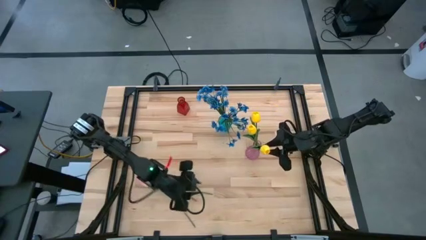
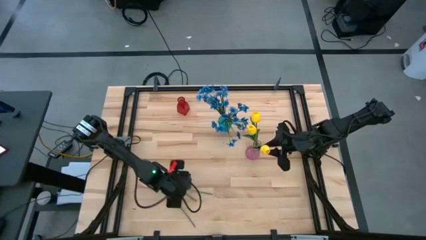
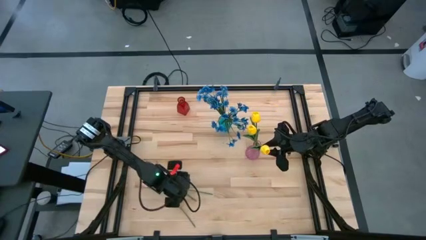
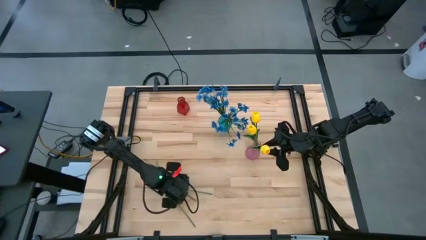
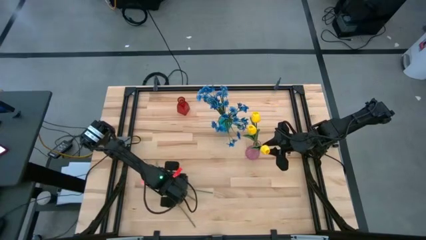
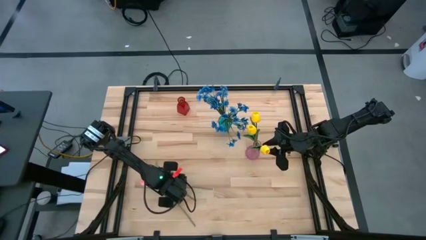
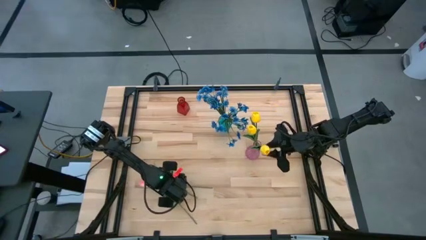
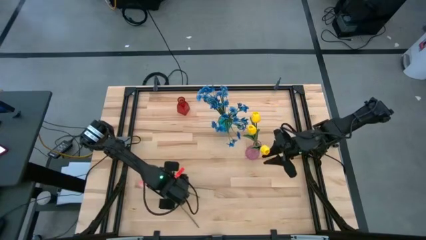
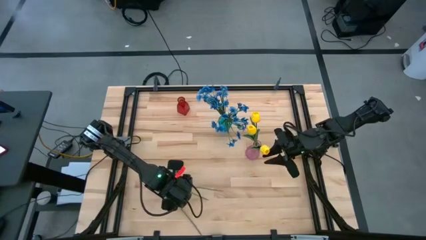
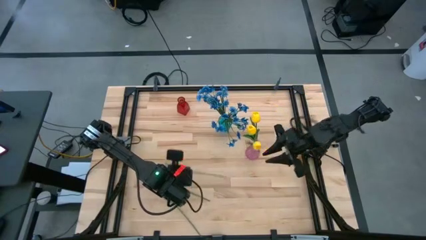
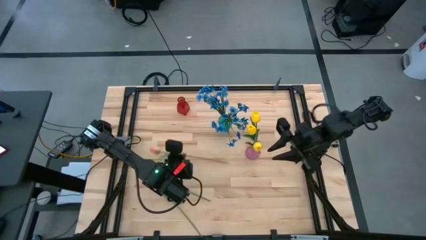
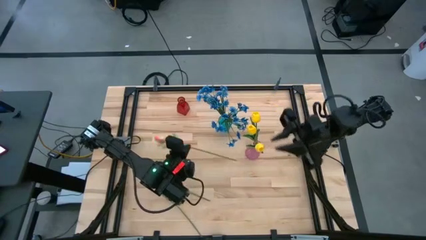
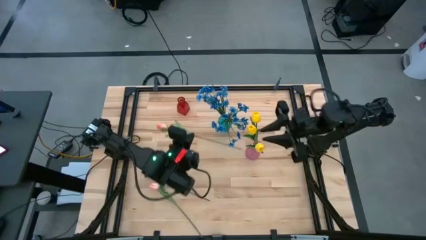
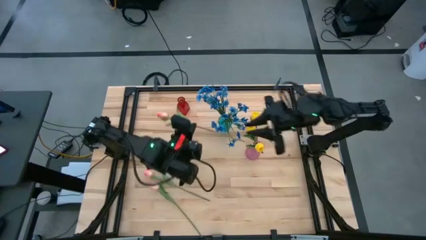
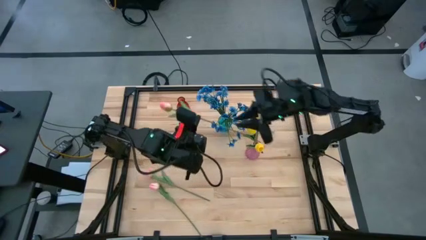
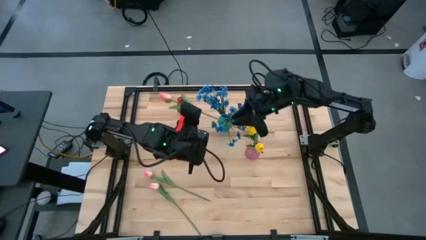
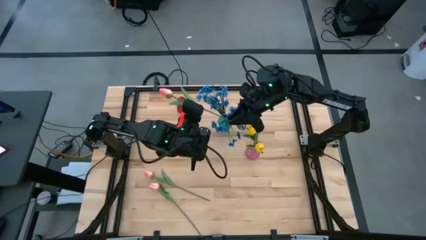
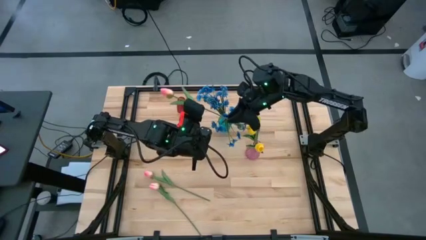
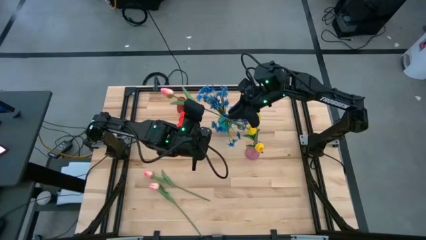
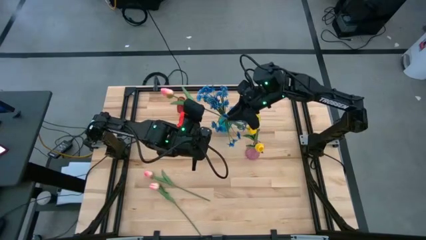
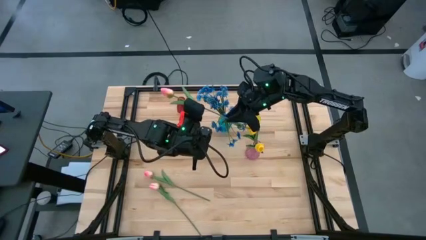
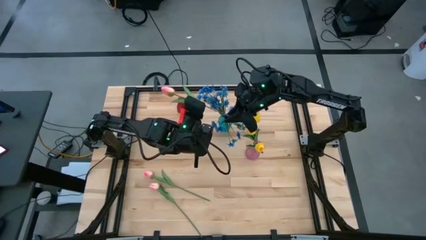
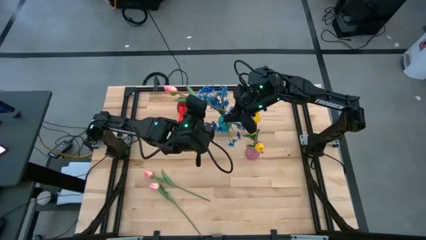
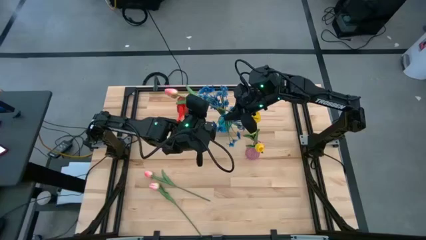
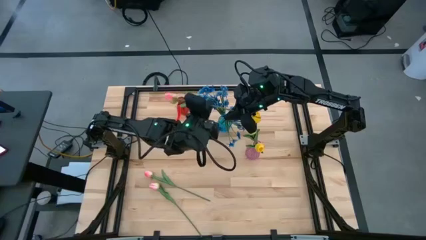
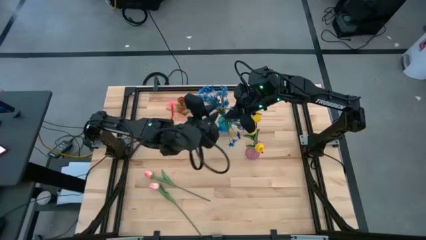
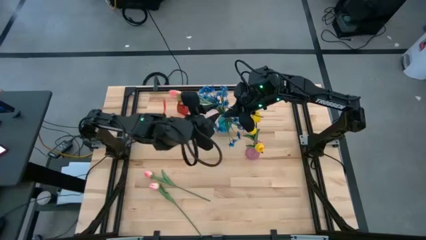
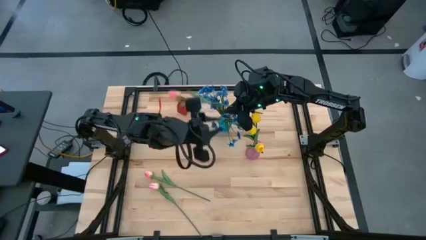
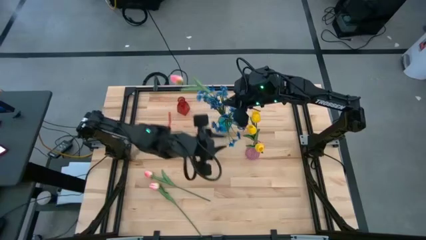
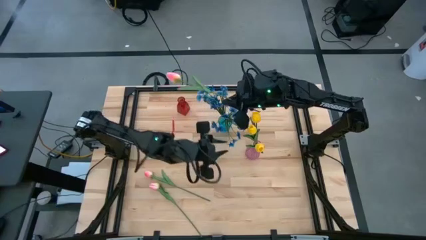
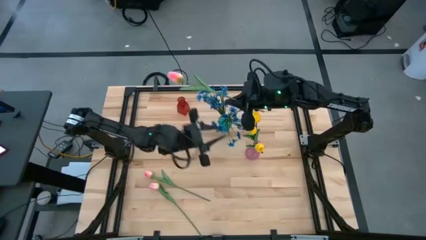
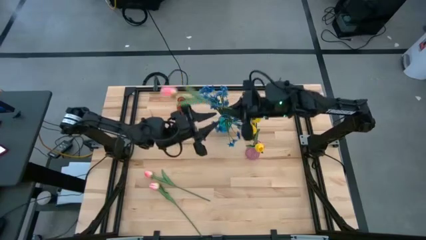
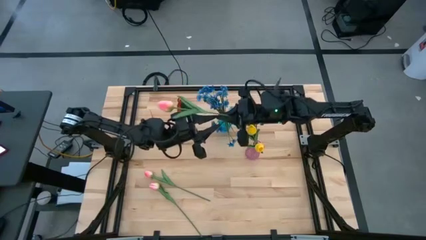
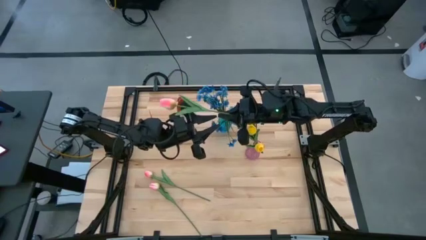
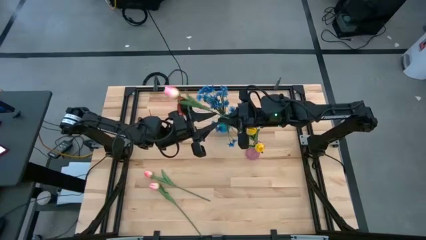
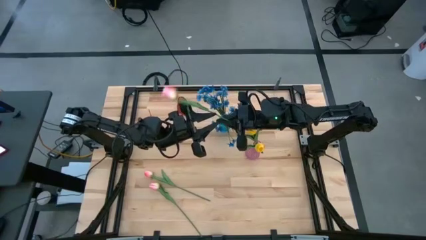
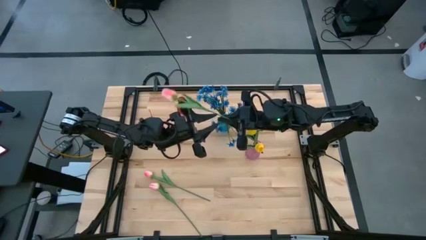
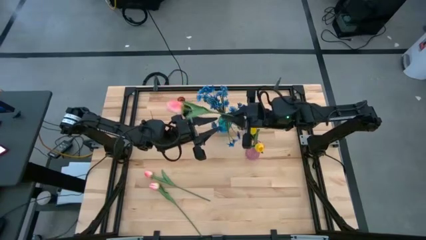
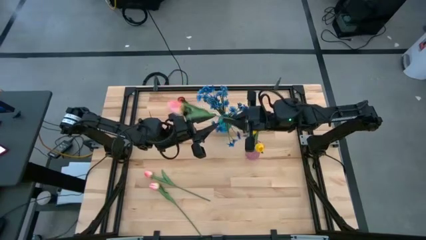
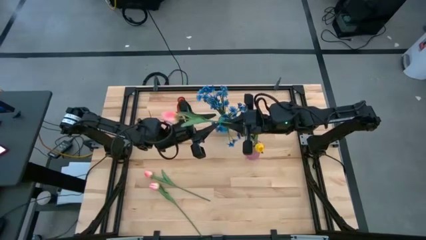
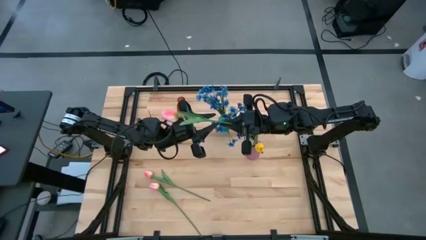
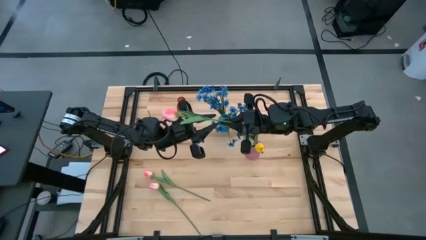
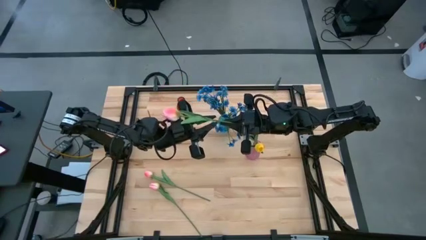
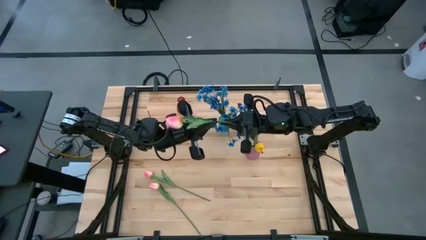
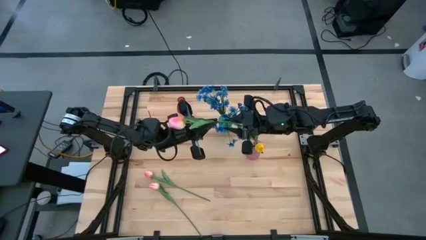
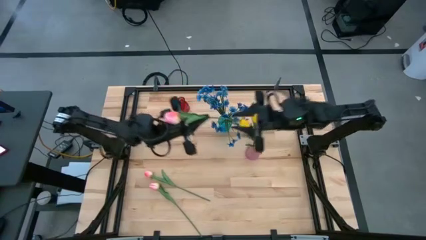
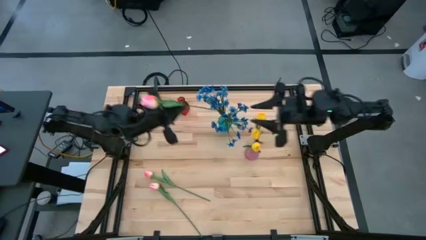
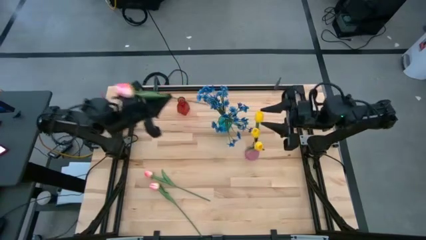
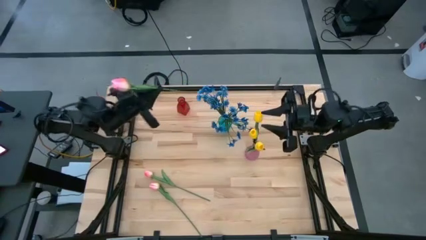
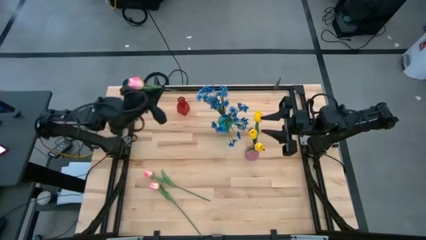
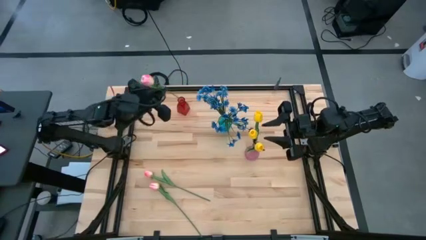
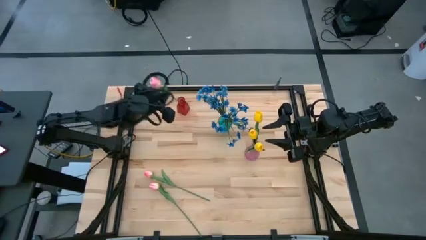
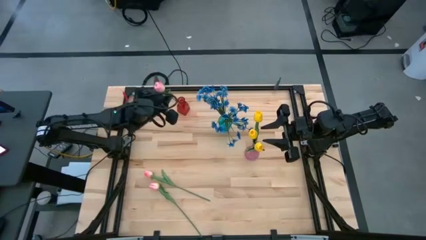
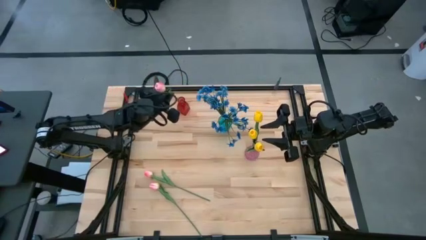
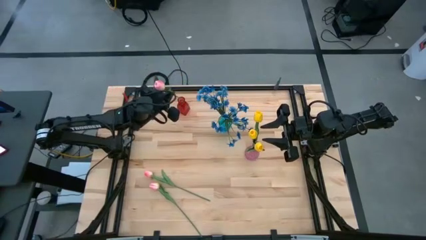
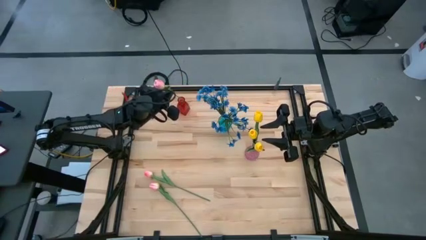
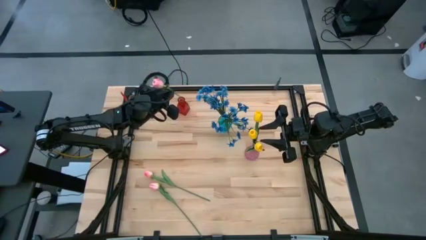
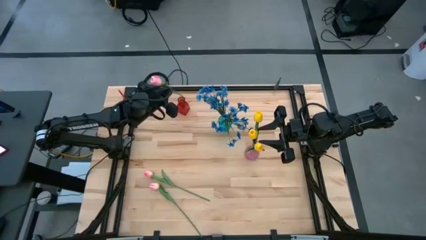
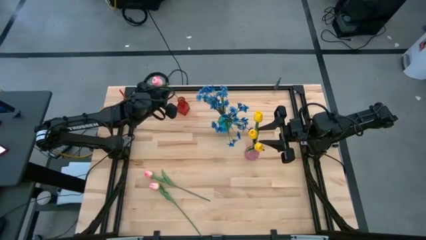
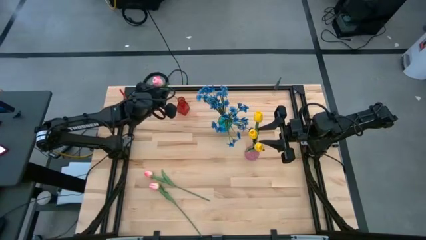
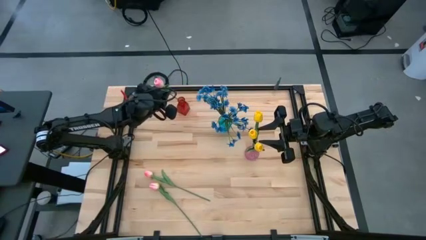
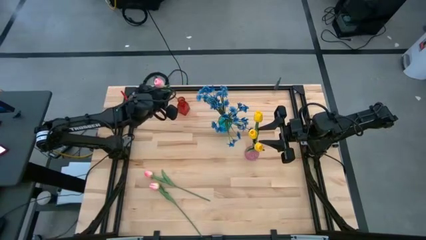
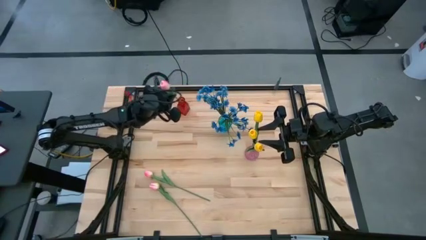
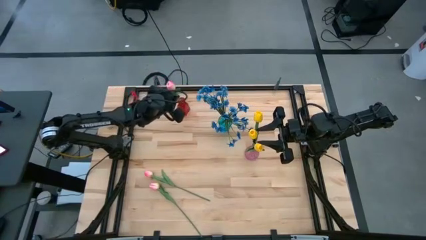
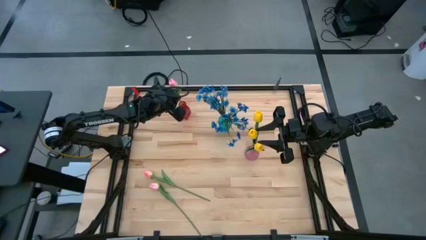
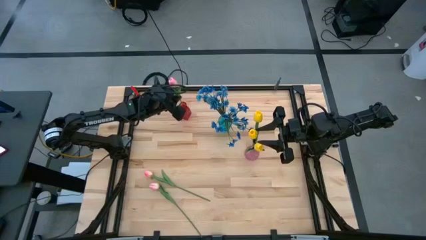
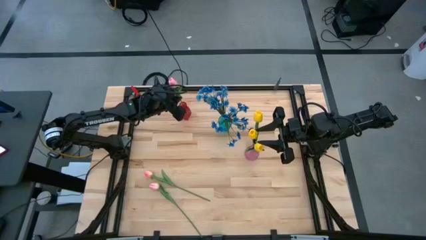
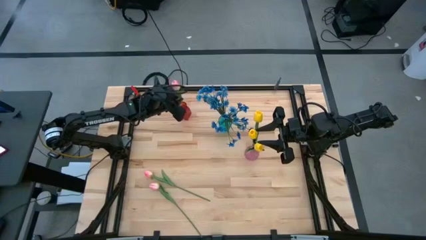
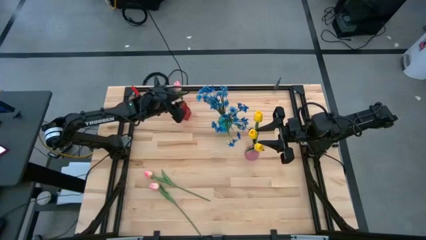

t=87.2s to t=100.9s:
Task: Sort flowers into vase by color
Put the bottom pink tulip into the red flower vase

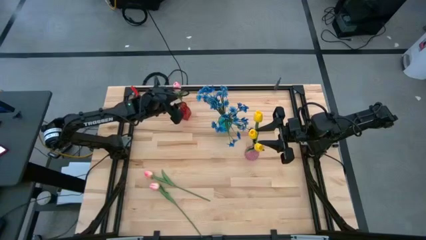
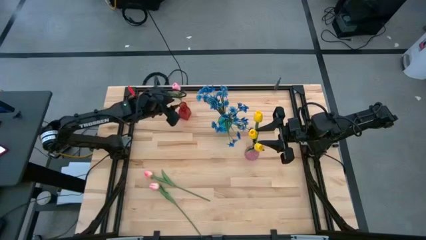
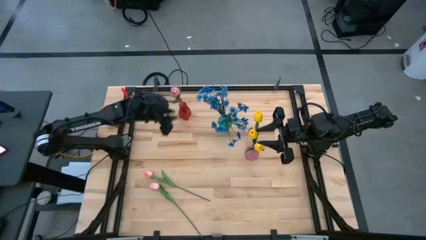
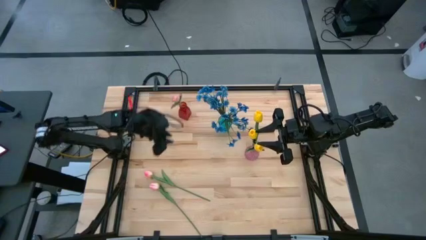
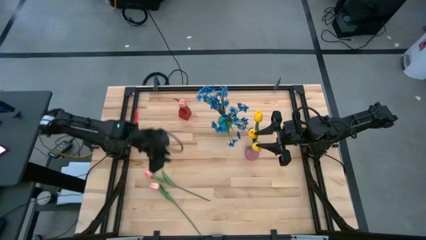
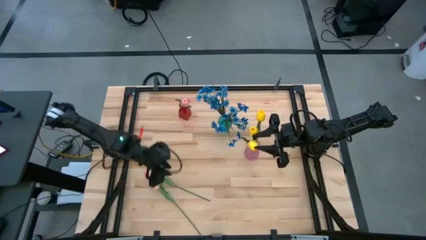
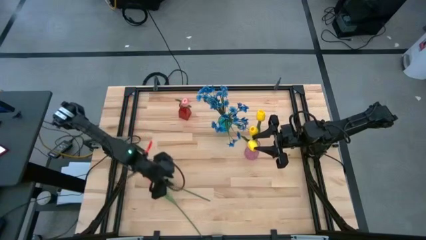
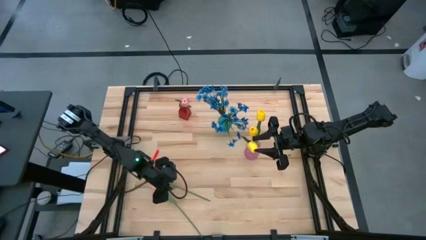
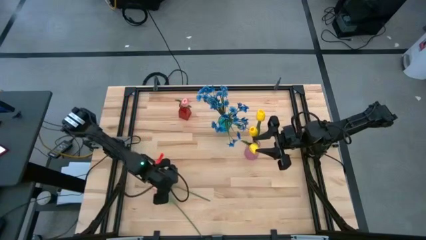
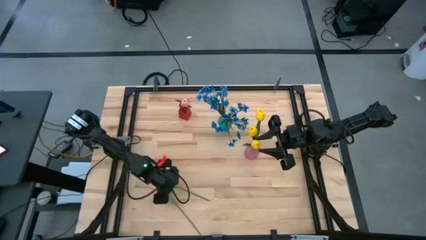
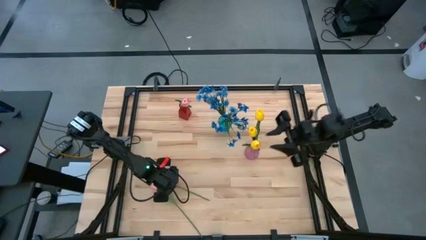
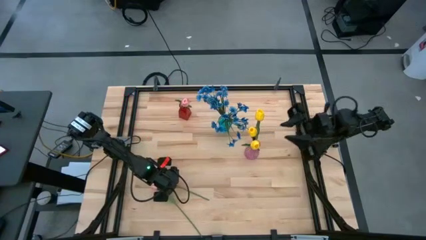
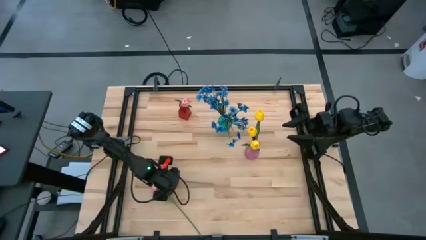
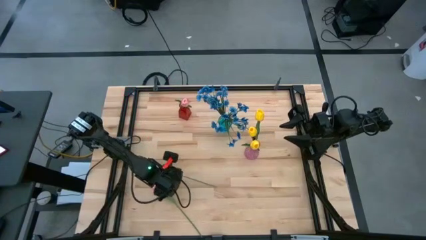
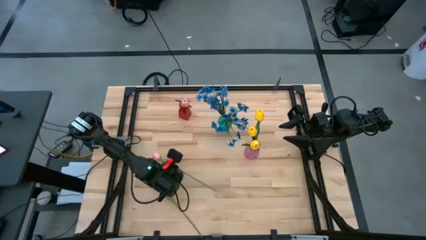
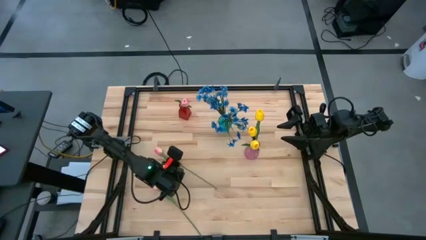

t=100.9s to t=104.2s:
Adjust the top pink tulip
